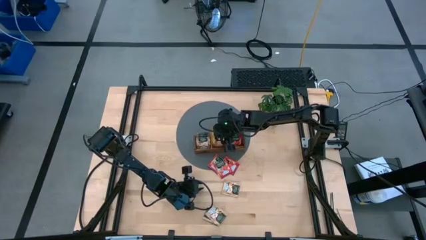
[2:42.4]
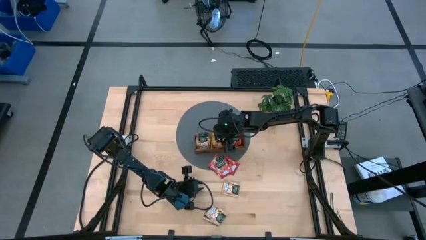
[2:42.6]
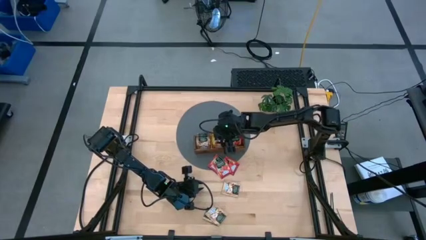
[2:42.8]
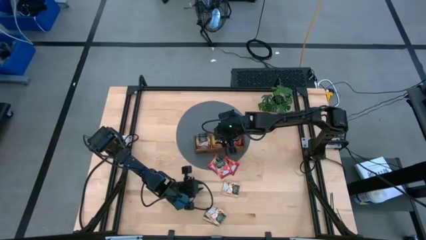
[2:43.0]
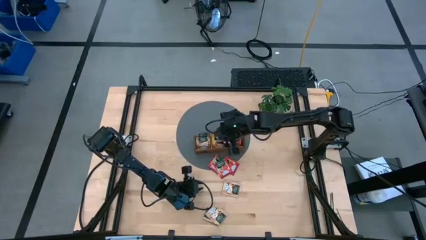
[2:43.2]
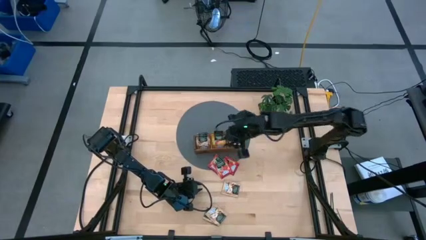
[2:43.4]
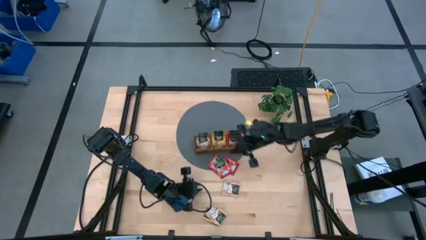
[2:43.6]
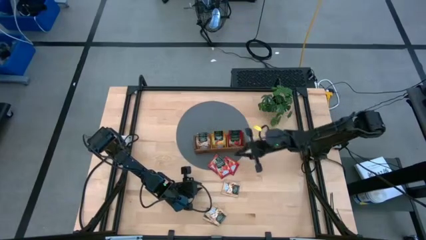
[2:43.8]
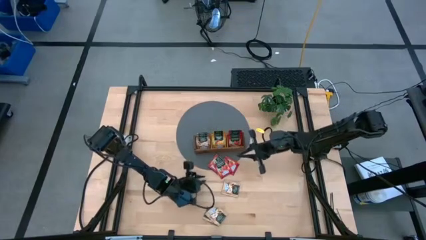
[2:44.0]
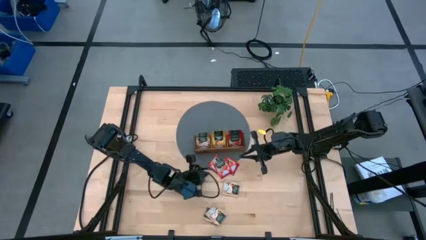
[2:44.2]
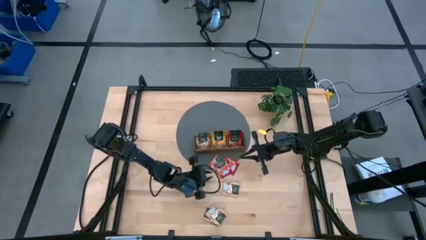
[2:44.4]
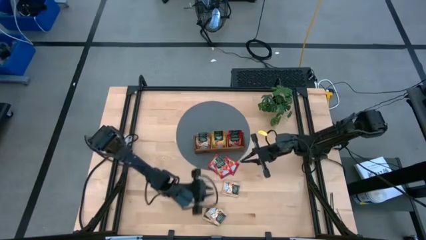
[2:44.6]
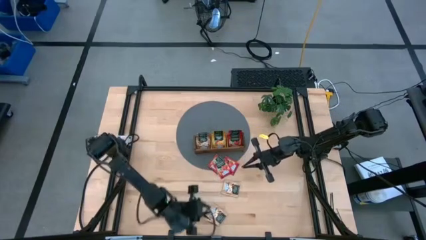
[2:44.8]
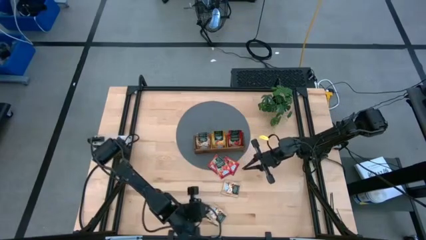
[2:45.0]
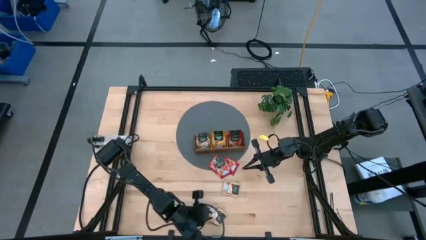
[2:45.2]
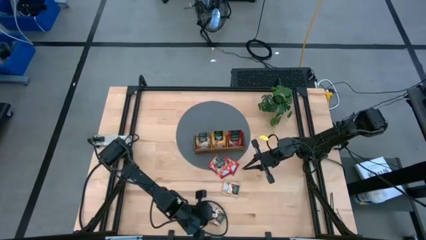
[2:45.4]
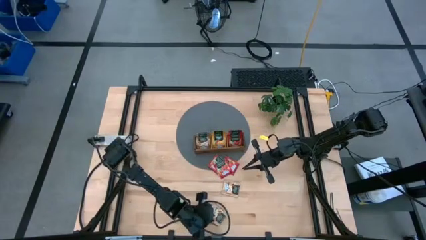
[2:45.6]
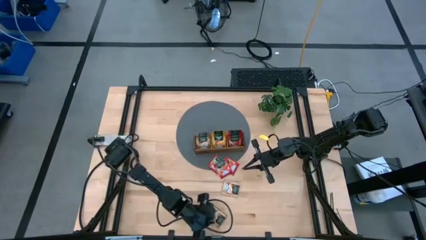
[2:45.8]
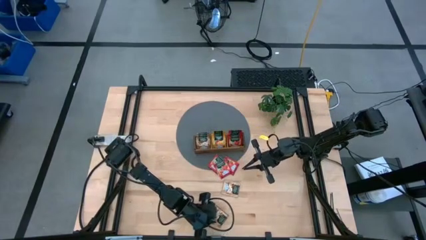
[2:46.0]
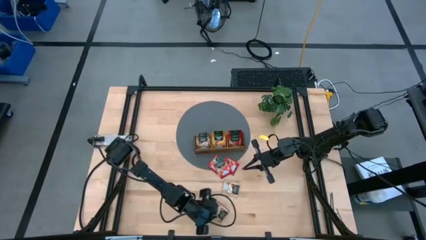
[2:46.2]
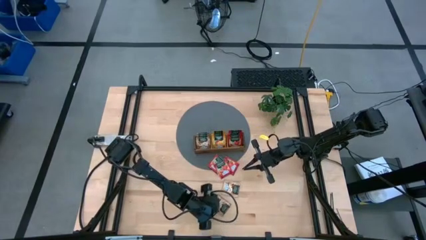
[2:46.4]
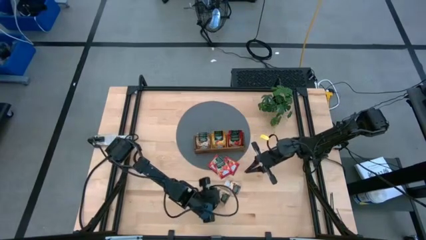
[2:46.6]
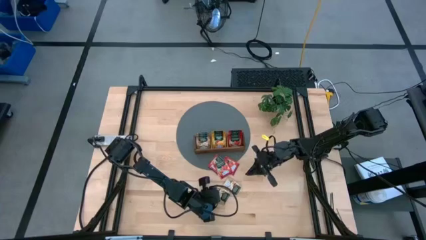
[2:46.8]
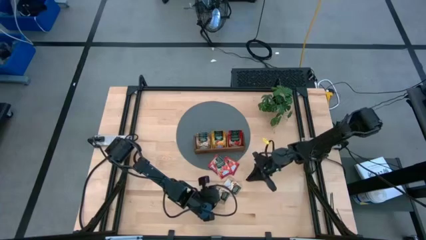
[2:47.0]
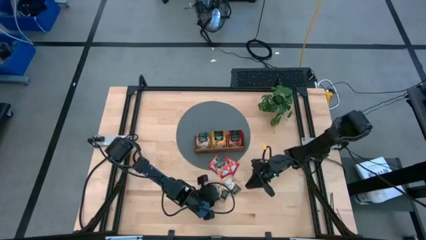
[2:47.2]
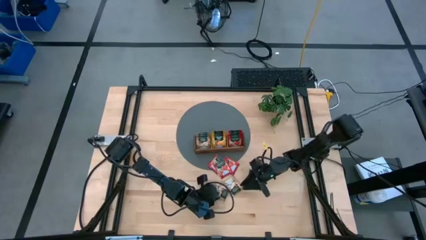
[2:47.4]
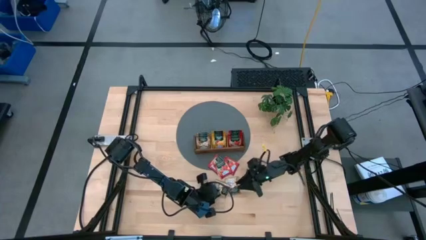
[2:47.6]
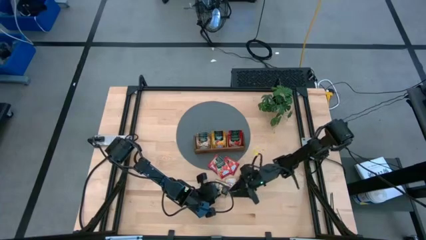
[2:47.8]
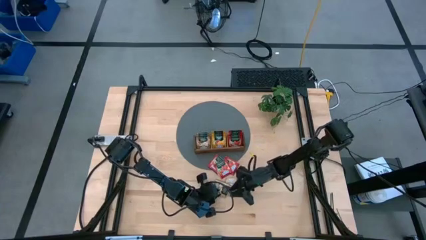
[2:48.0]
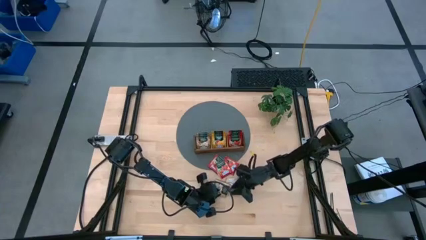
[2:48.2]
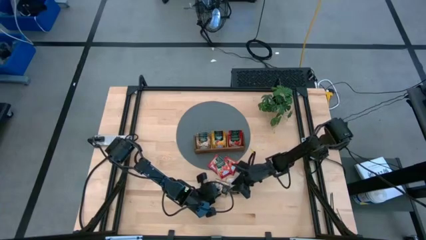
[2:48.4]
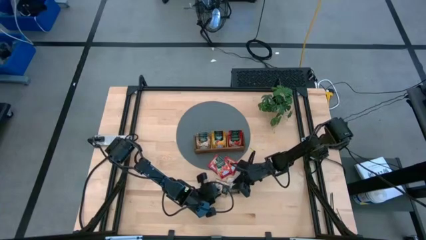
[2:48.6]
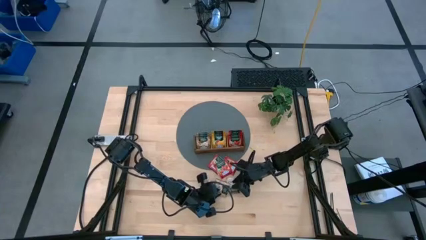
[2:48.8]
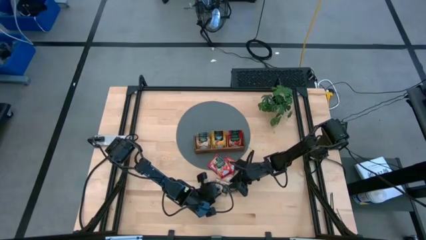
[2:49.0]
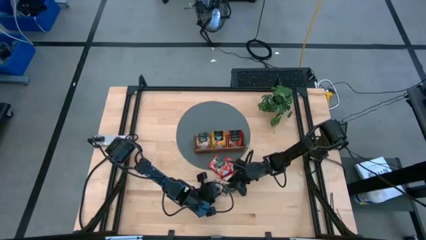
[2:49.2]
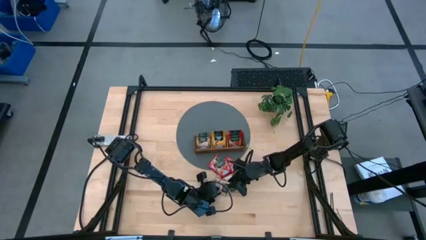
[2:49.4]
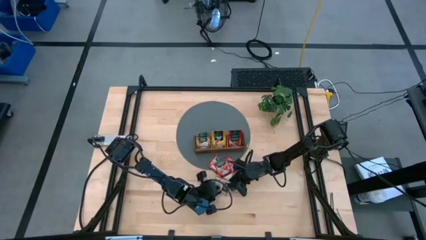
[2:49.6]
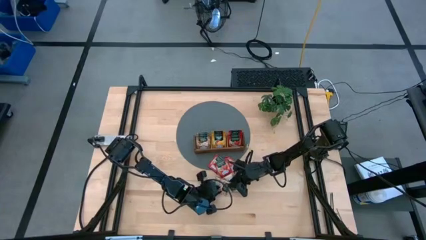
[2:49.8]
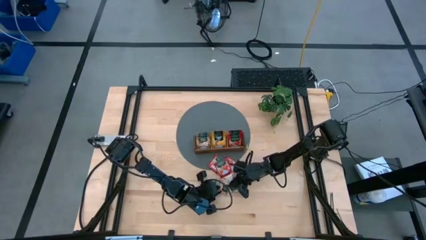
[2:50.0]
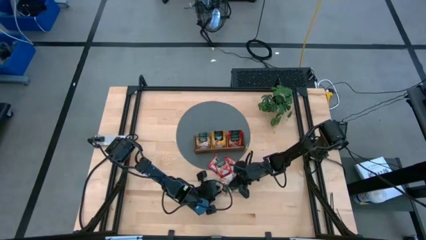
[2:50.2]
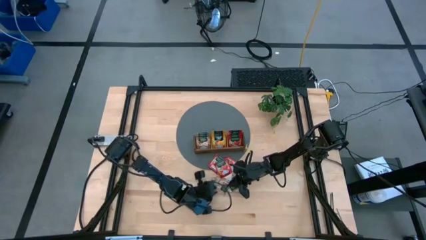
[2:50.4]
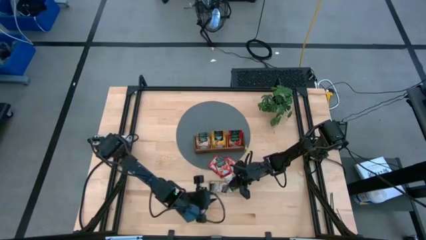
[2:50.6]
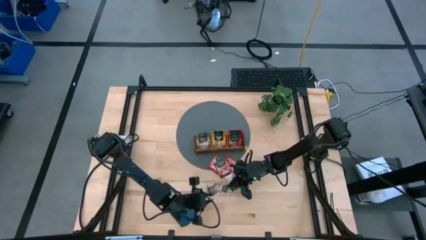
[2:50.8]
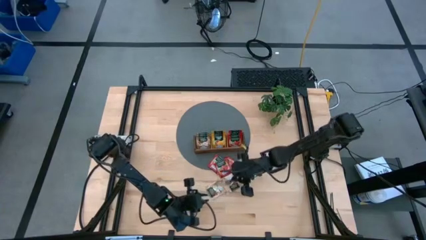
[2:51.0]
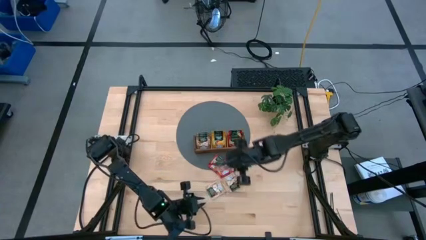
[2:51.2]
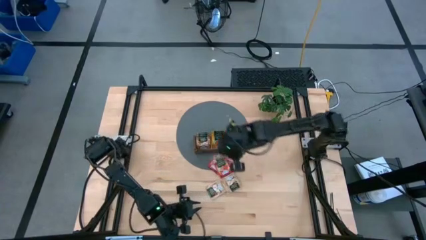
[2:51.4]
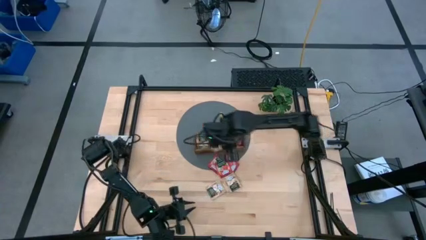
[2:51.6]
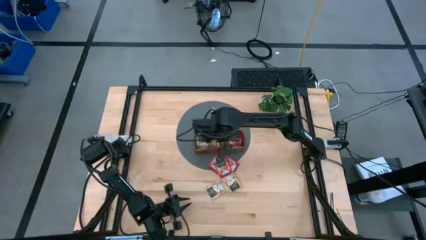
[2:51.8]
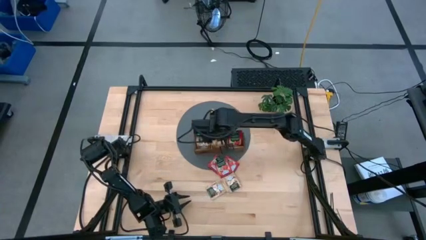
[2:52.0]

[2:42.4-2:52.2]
Task: Pick & Place Tea
Put the brown tea bag into the left section of the wooden organizer

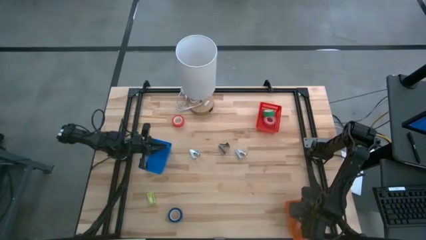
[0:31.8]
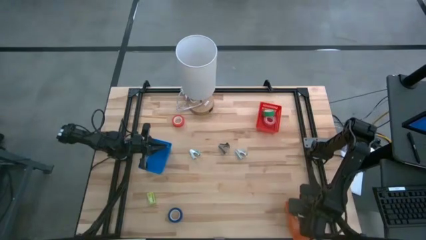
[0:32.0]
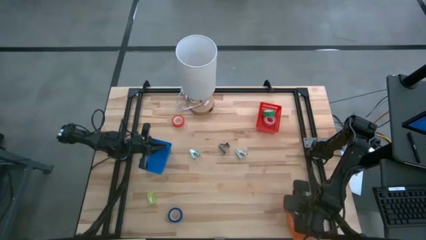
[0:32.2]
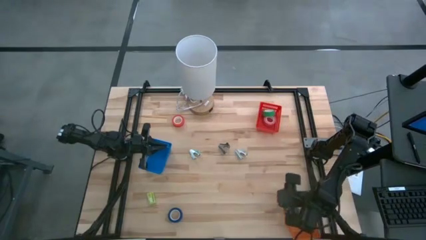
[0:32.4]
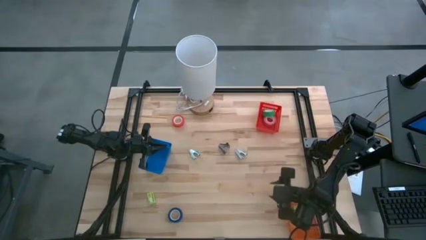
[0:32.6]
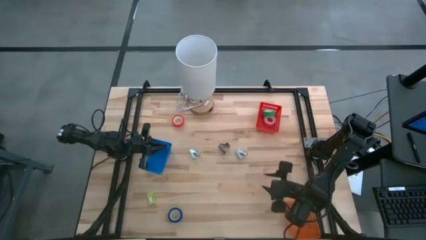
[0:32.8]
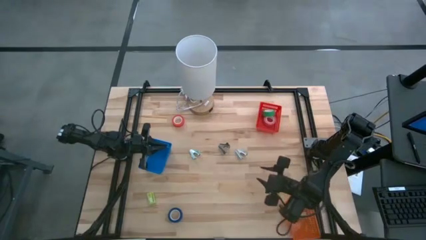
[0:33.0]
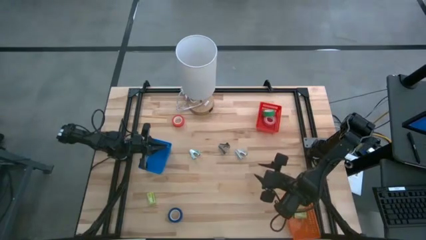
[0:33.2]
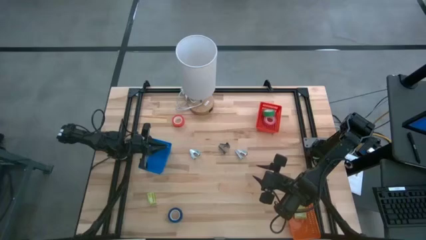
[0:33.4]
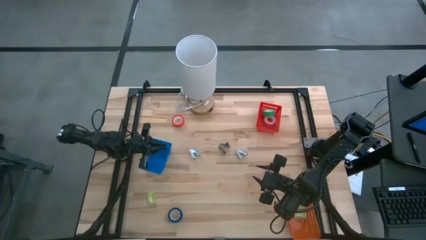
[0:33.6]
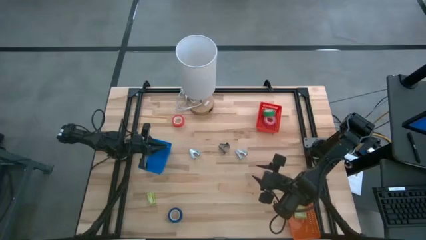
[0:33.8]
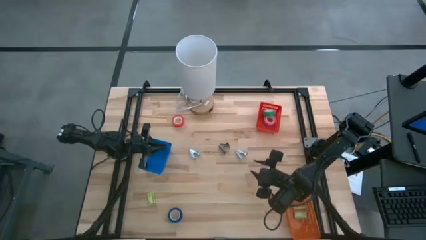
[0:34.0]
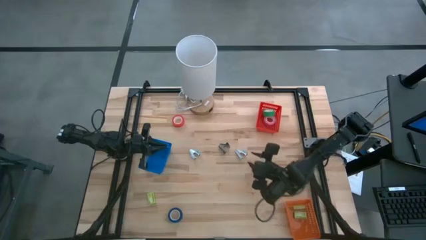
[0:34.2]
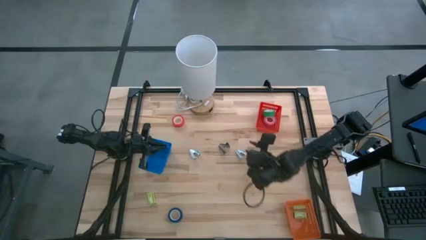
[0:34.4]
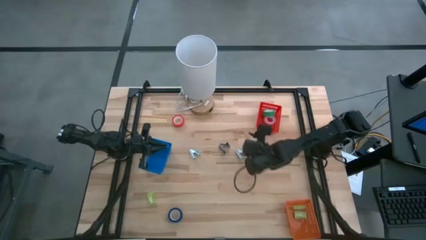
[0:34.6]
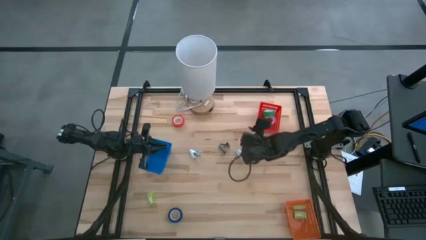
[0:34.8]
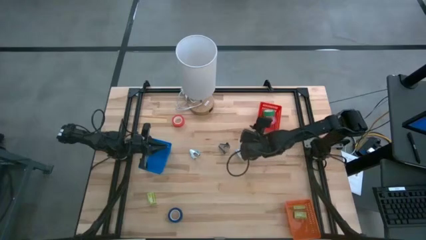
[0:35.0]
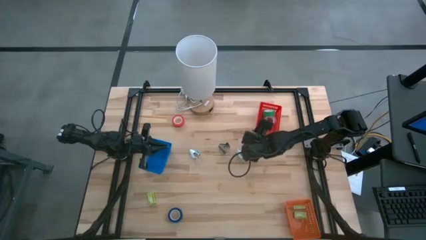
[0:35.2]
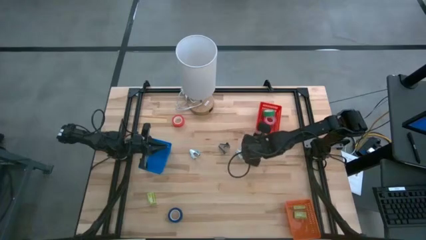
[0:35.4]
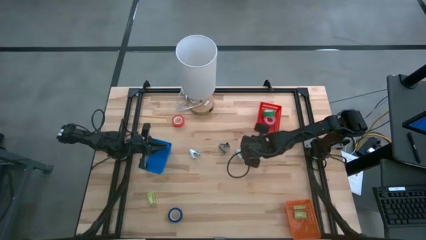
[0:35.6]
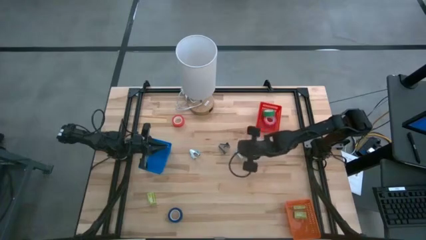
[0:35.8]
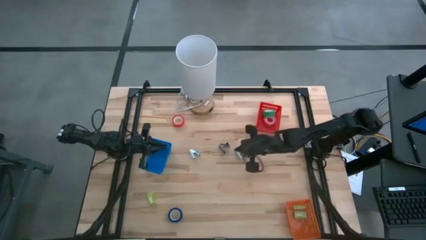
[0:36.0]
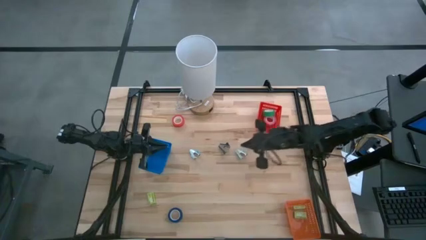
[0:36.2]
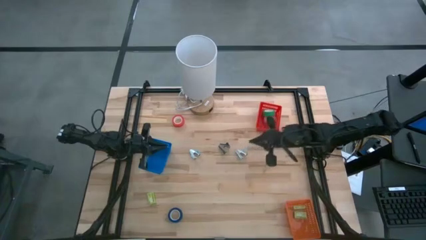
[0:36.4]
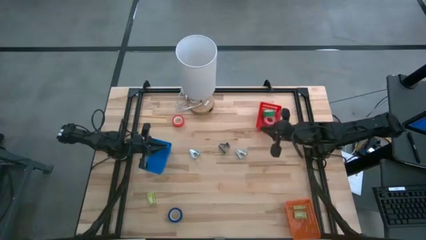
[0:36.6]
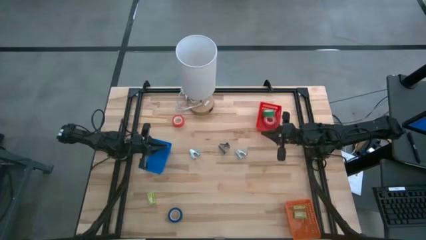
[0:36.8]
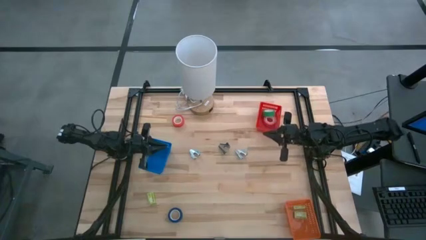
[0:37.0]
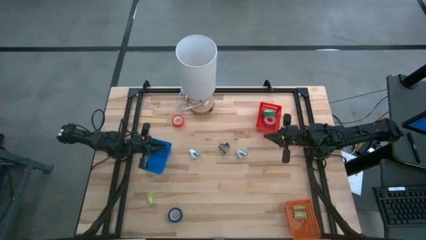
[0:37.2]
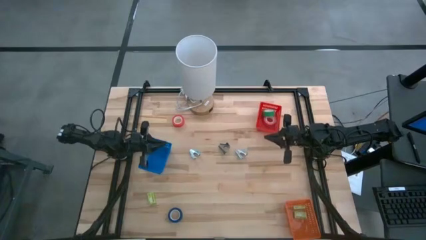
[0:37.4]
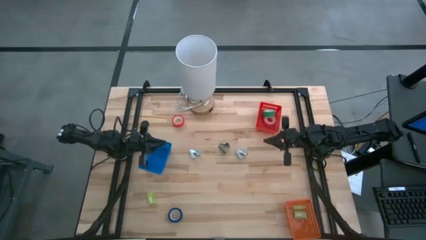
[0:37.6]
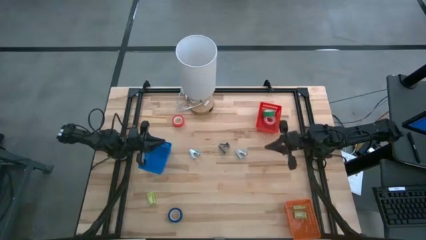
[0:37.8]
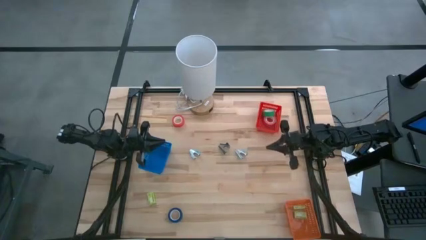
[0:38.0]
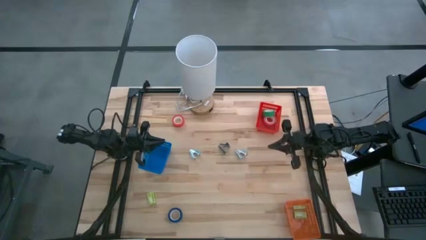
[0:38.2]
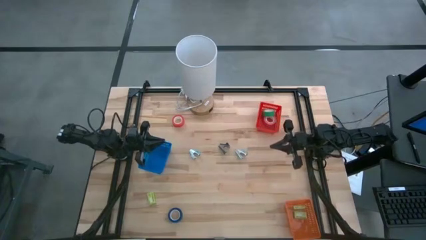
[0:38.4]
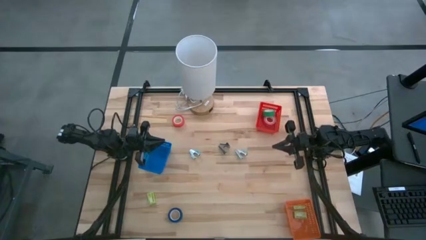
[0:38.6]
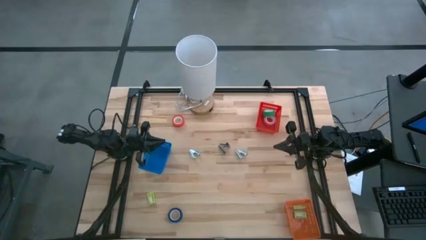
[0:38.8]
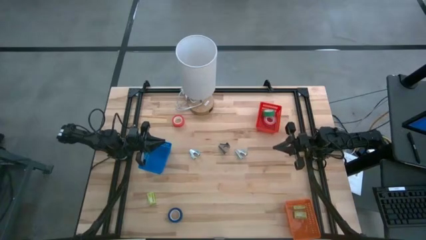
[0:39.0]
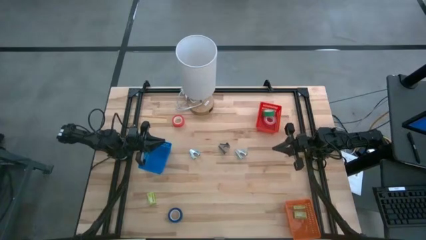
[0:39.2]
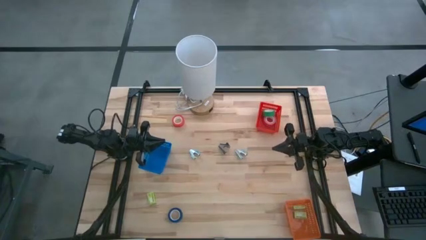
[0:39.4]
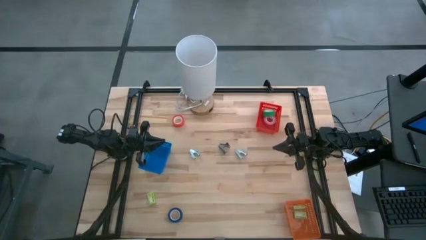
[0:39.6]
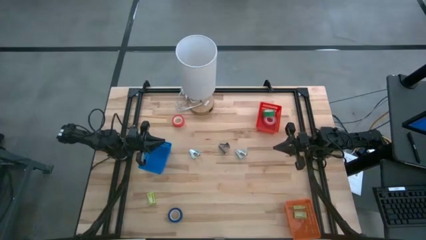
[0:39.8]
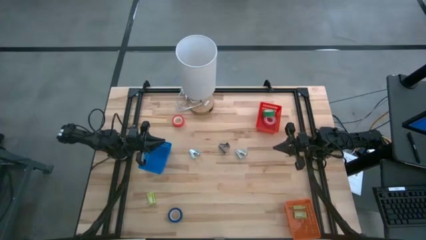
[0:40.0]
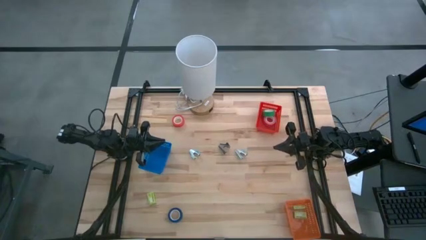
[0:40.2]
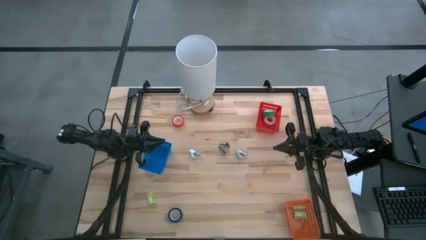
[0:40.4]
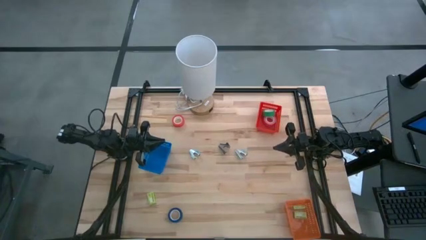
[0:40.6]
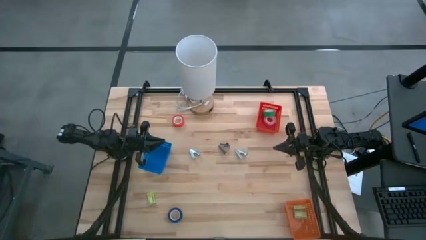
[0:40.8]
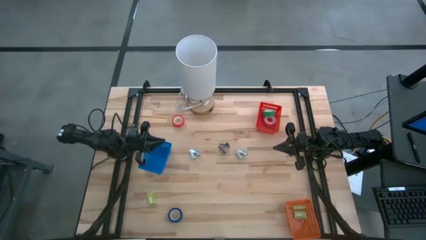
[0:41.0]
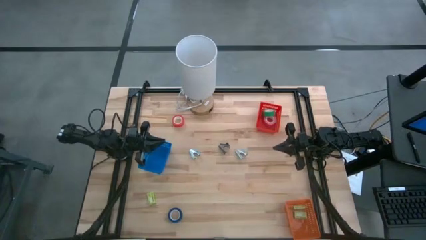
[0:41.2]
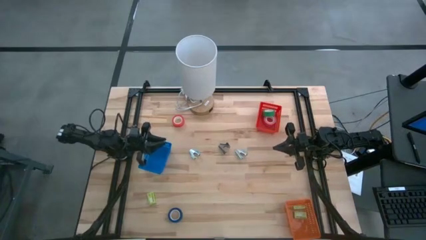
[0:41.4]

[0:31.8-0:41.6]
Task: Pick and place Stapler, Stapler remover, tape
Put the red tape into the red bin
